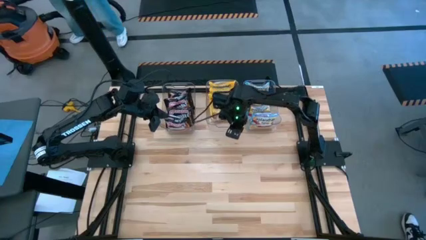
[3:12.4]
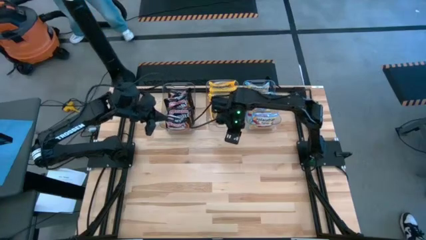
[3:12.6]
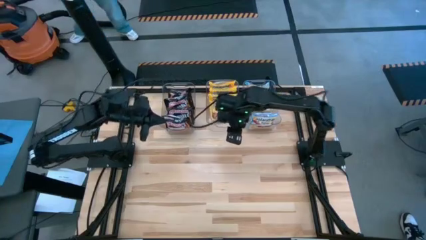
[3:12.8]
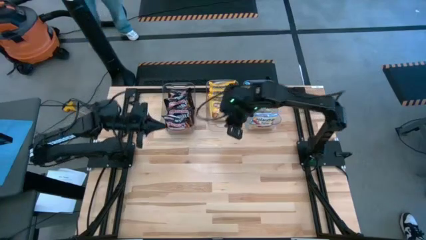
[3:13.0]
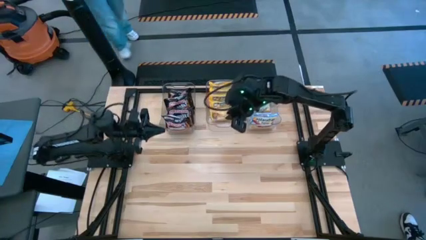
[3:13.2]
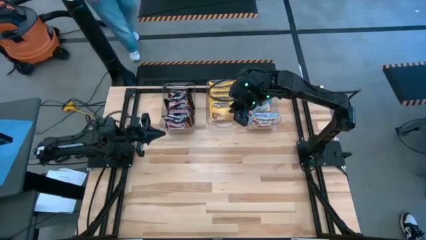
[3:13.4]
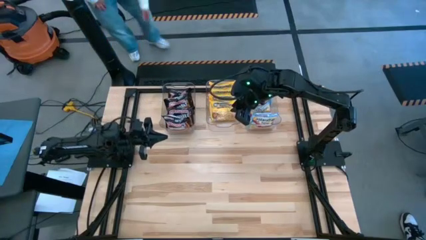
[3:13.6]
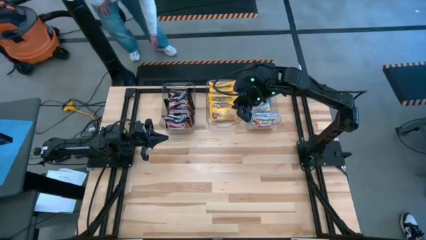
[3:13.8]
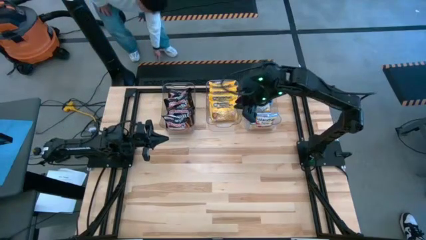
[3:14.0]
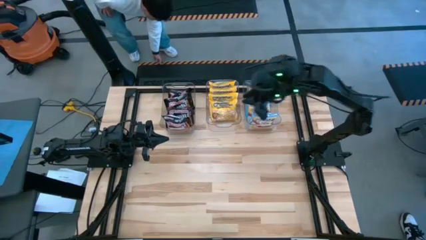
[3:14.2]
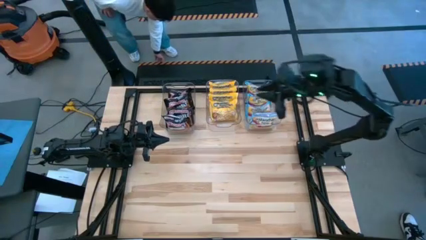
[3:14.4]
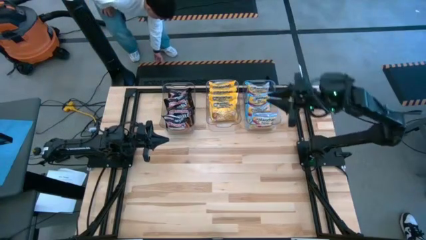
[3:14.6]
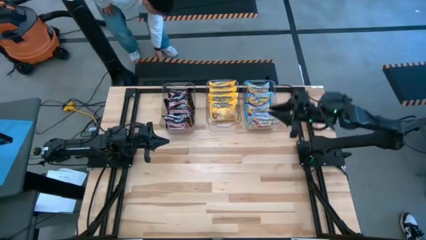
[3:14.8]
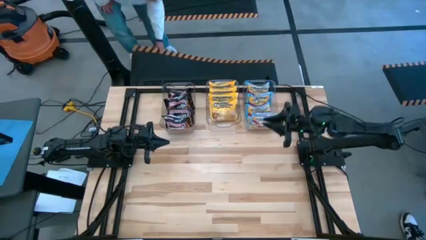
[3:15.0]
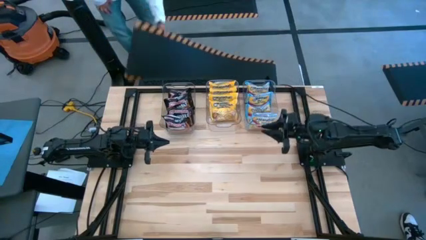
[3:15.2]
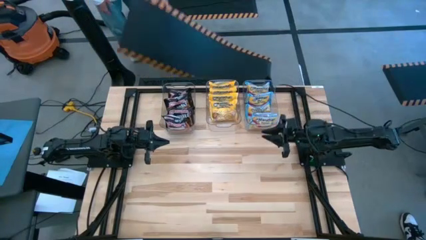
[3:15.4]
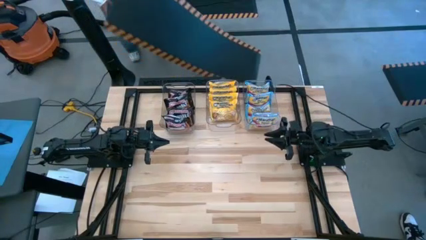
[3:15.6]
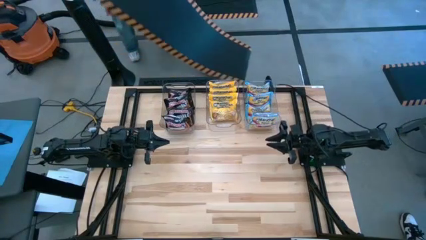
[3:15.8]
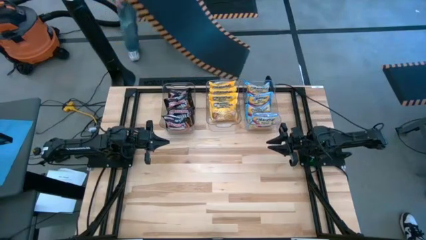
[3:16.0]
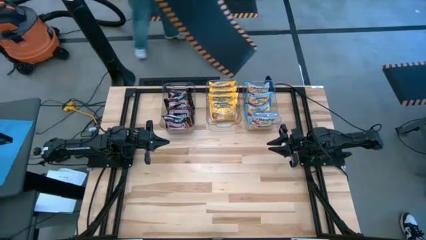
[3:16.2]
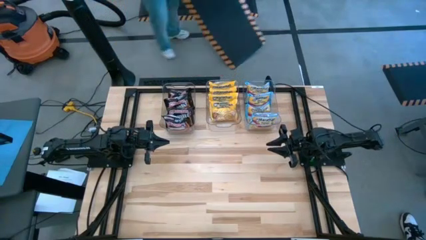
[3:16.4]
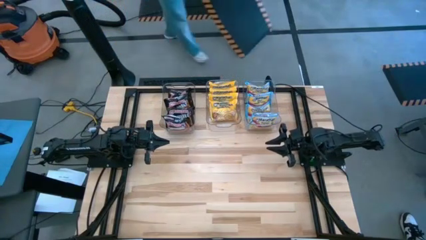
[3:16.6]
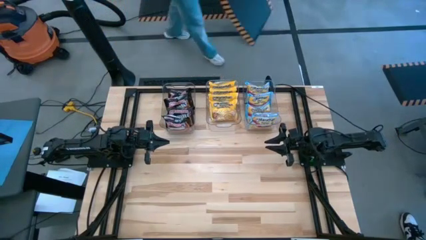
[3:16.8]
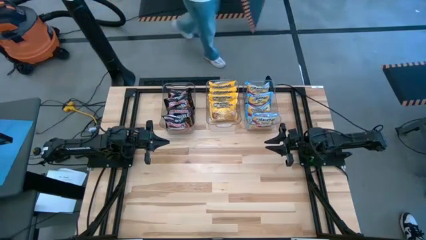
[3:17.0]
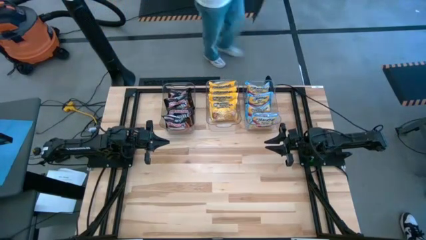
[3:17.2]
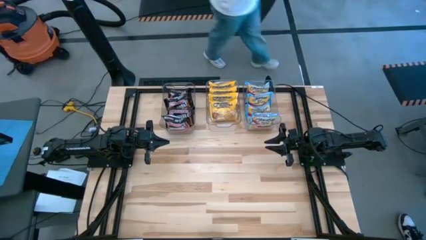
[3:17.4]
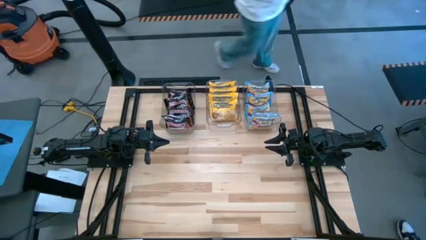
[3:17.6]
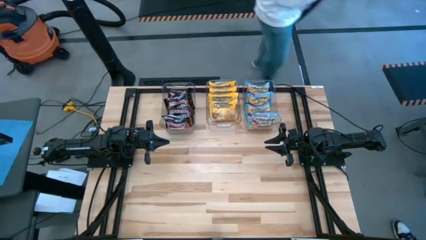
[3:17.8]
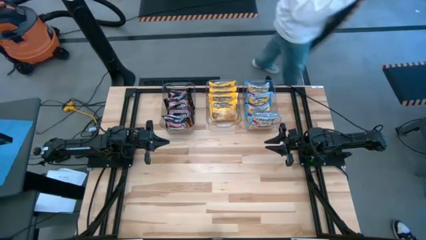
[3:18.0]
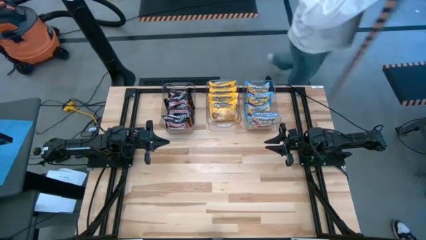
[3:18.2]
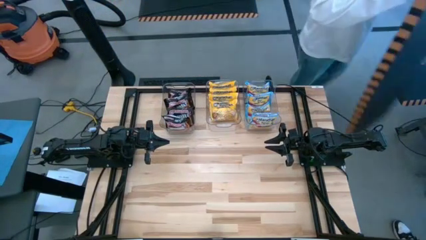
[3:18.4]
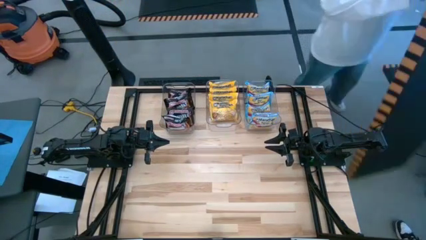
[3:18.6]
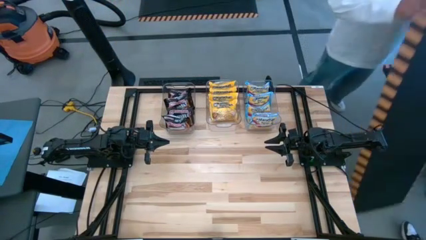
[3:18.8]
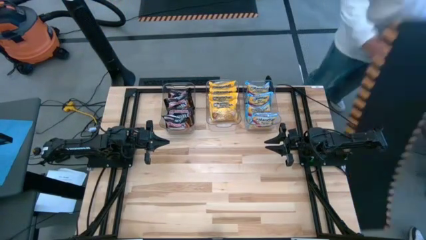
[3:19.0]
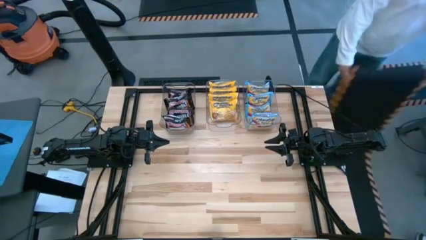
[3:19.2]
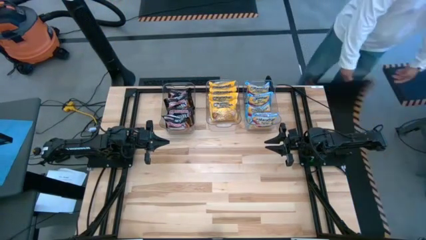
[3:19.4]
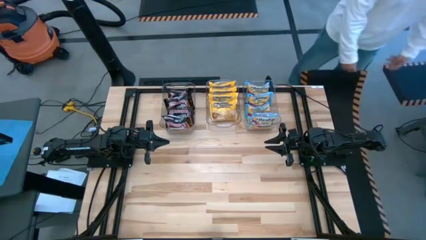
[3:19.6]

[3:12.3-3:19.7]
Task: Sort Maruchan noodles
Return to Home Position

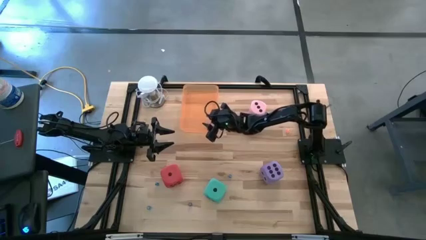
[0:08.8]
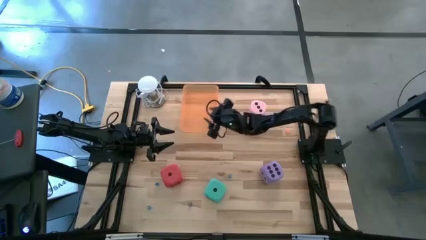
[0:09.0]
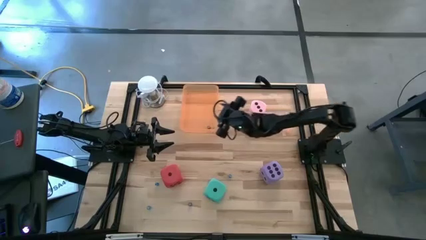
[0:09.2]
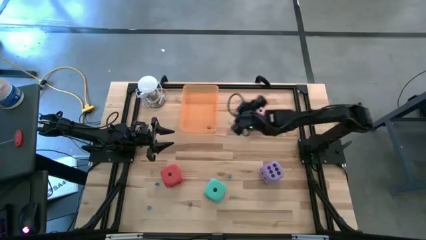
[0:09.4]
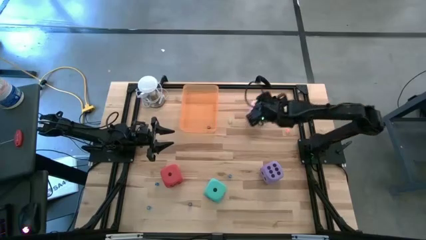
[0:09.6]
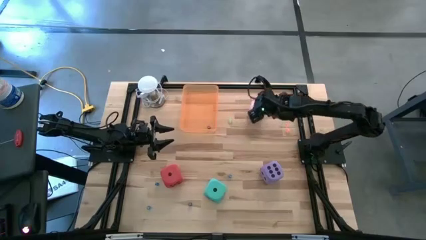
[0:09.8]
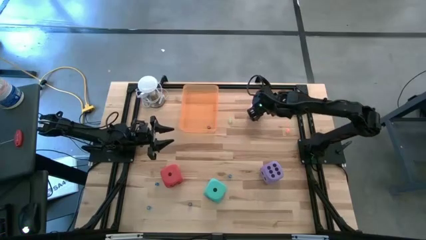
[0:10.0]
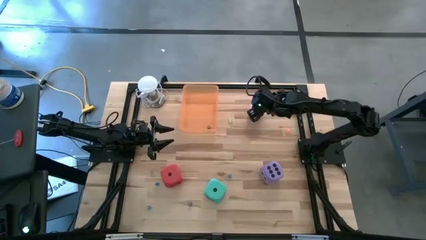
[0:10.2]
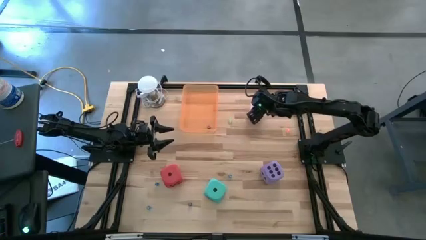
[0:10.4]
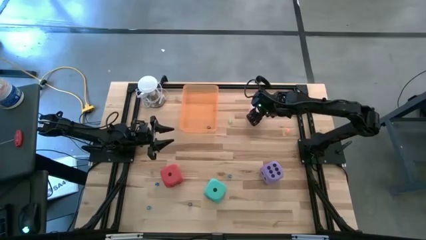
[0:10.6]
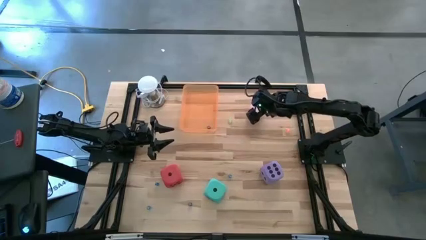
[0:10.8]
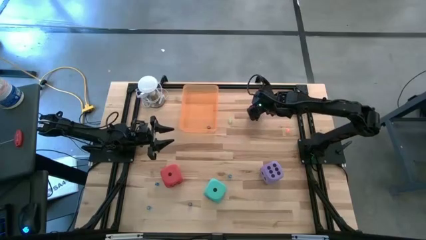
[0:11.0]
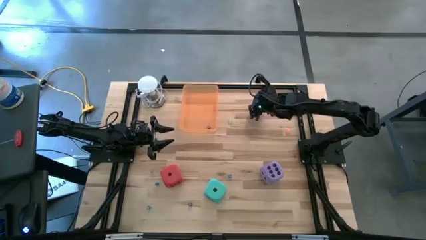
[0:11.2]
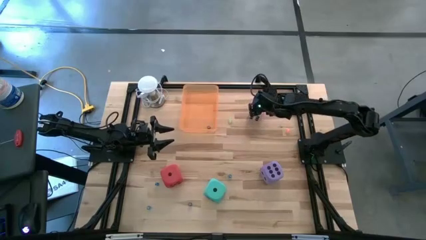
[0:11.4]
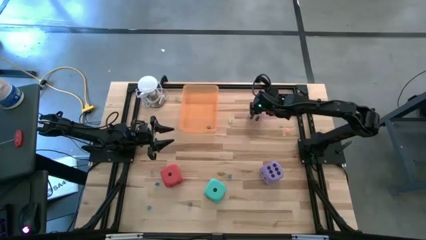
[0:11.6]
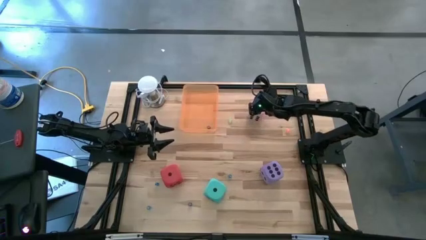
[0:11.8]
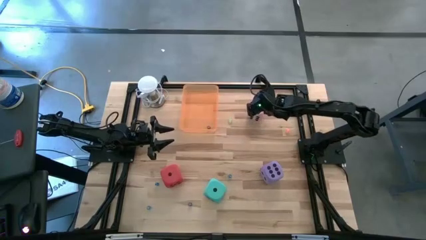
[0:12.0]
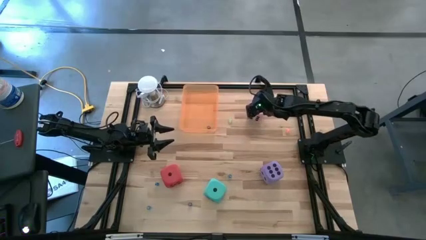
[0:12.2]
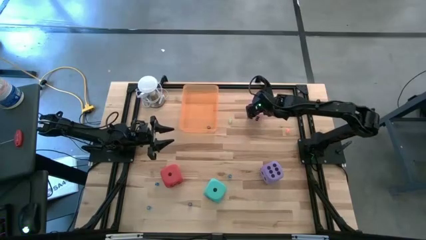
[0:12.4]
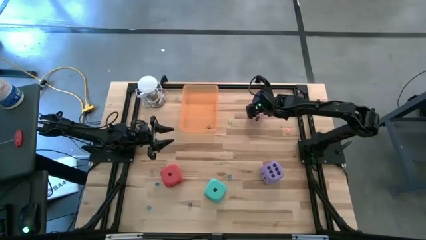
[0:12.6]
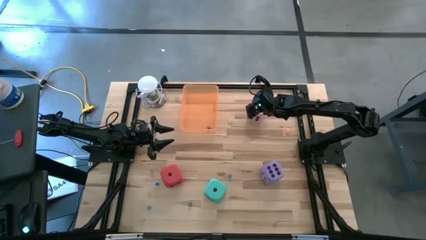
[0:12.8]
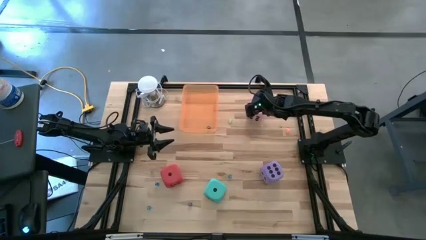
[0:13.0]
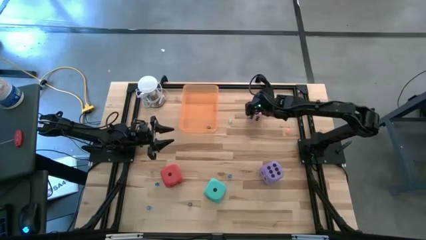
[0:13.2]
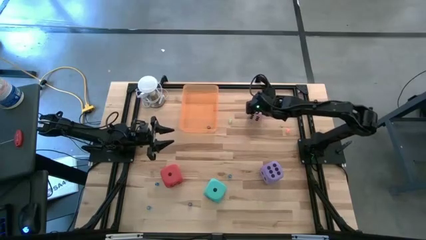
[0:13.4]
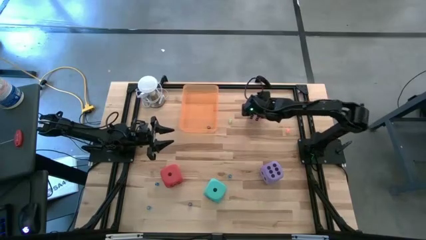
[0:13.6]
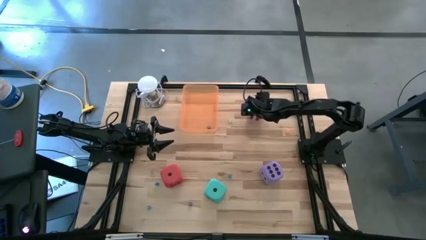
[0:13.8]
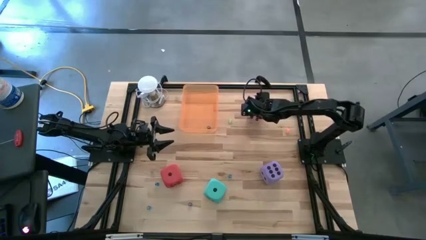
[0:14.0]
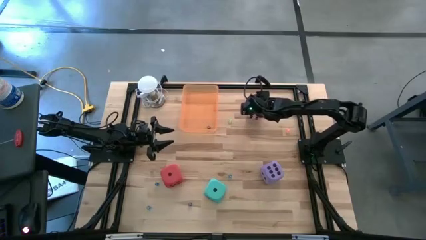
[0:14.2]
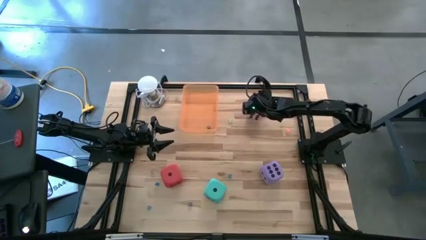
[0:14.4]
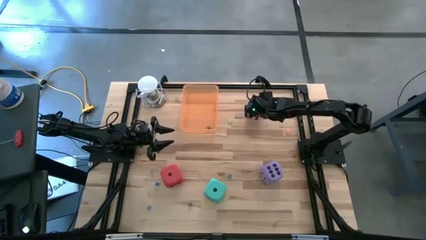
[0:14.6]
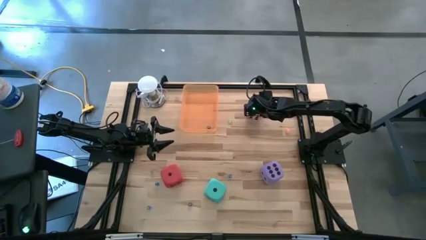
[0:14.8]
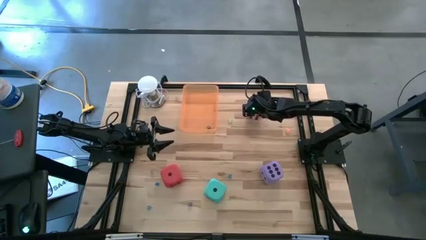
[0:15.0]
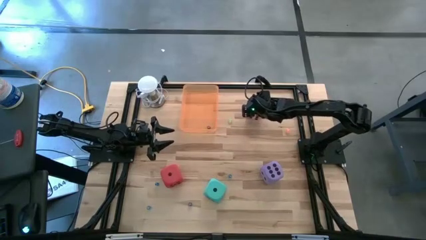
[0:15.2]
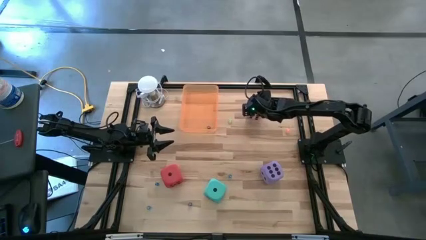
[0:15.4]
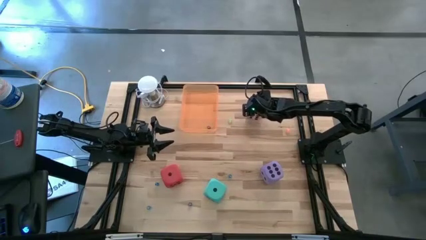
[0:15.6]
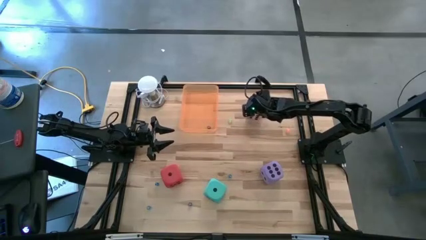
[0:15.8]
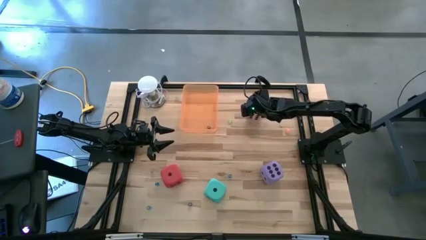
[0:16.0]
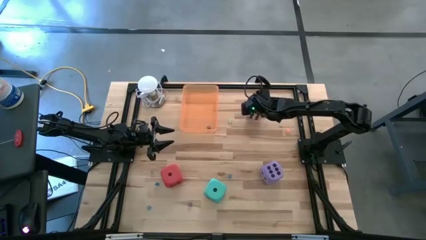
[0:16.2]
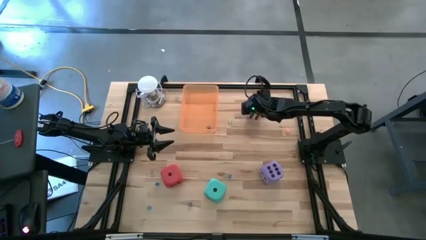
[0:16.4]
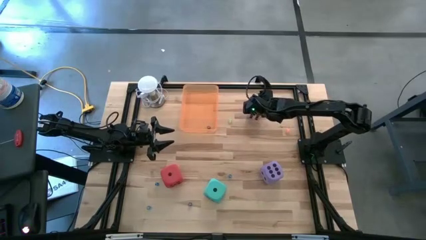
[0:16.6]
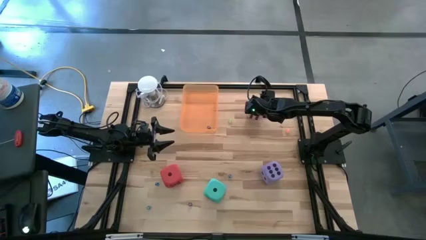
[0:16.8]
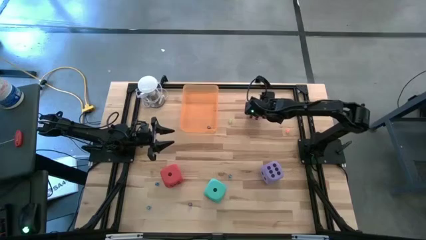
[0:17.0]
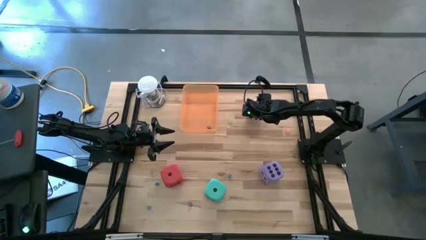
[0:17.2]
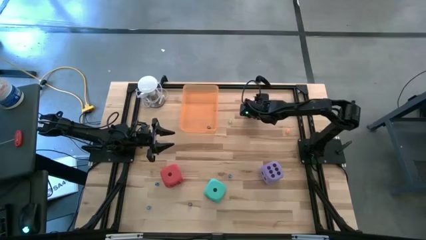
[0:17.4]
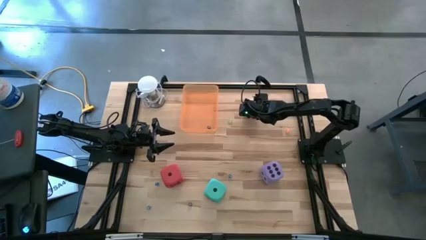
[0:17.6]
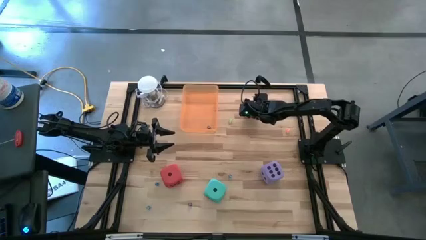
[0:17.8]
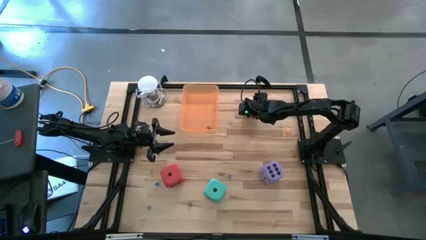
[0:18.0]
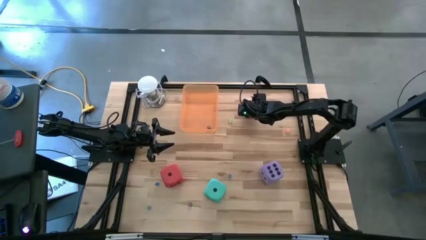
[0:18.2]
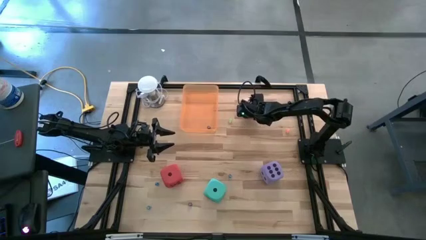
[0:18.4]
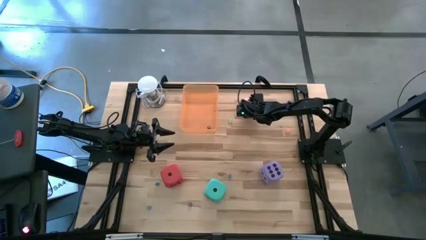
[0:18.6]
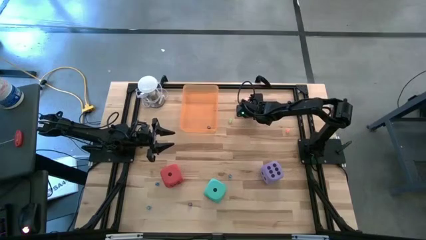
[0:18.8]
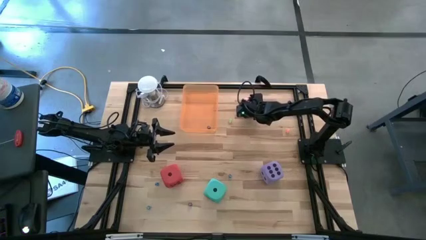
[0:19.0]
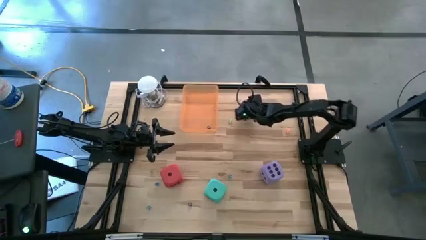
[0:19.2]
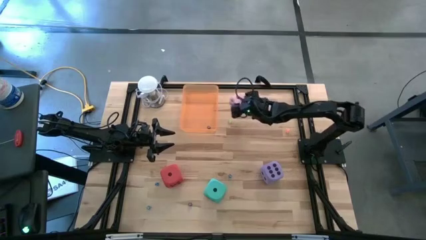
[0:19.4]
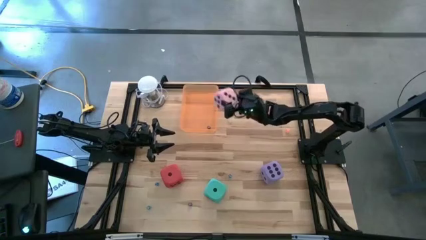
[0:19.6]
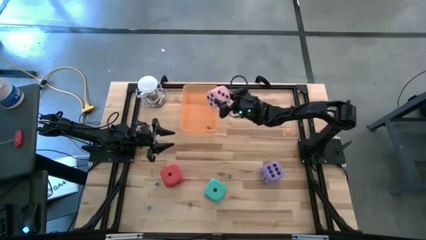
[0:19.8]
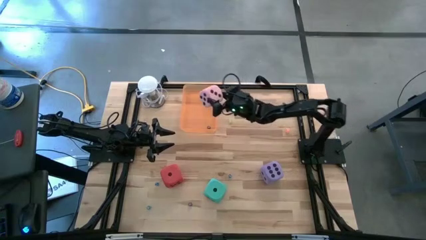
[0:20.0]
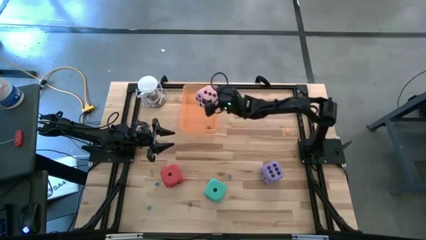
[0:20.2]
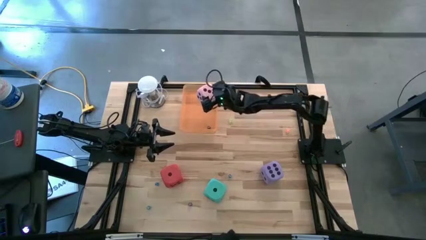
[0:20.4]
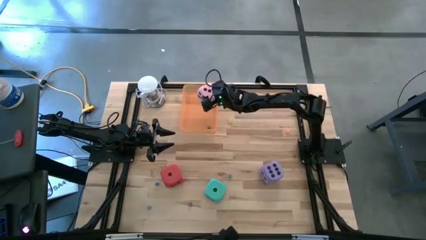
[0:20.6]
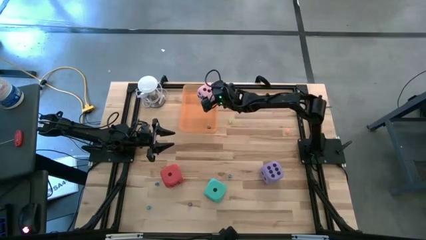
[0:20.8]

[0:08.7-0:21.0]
Task: Pick & Place Dice
Put the big pink die into the orange bin
